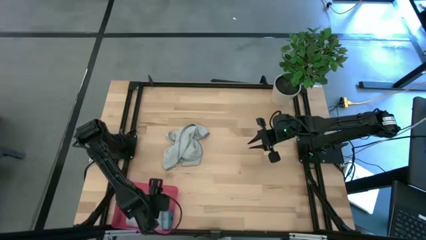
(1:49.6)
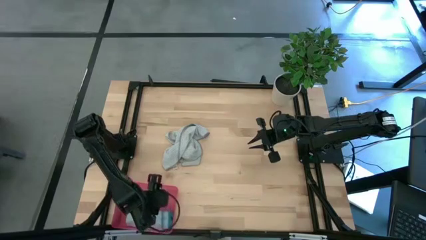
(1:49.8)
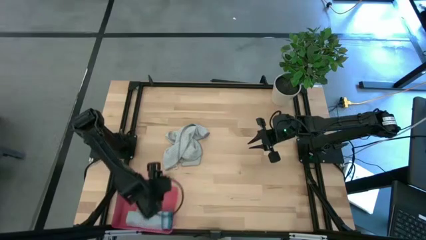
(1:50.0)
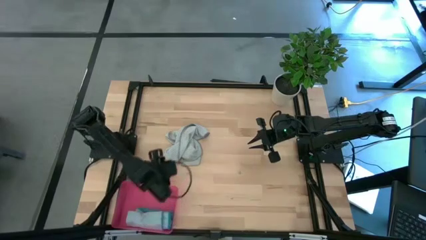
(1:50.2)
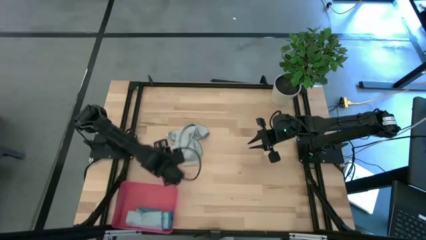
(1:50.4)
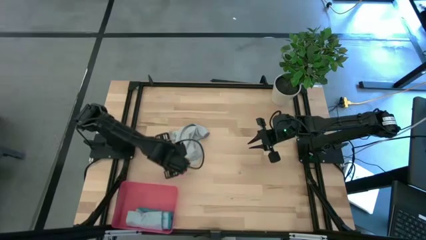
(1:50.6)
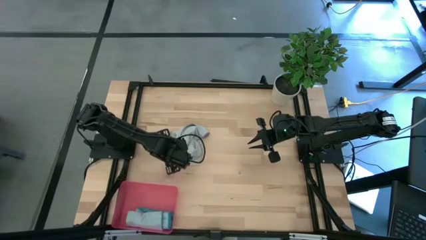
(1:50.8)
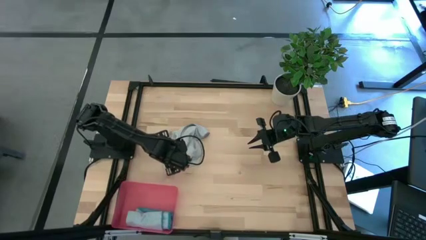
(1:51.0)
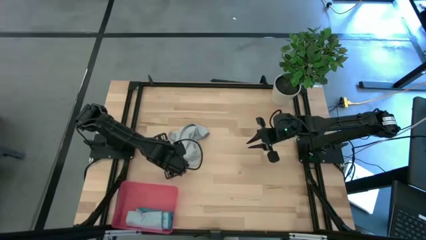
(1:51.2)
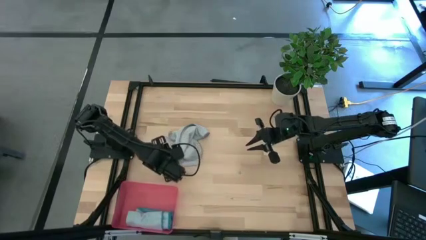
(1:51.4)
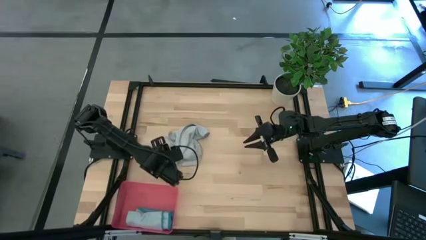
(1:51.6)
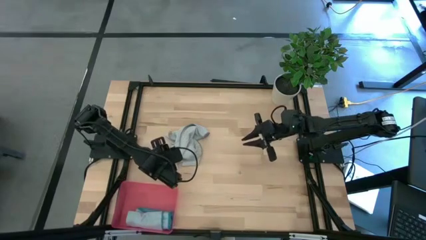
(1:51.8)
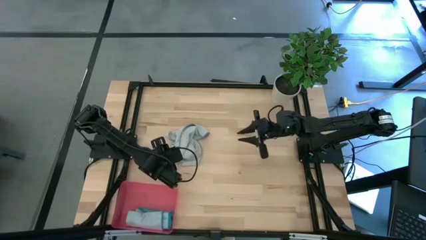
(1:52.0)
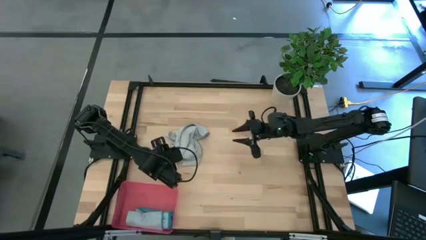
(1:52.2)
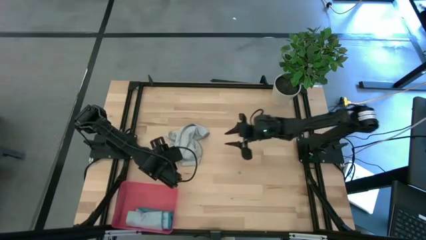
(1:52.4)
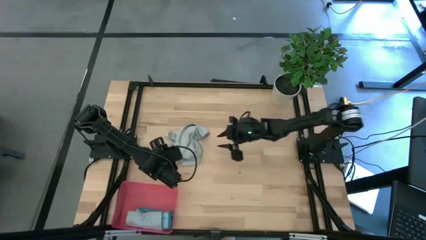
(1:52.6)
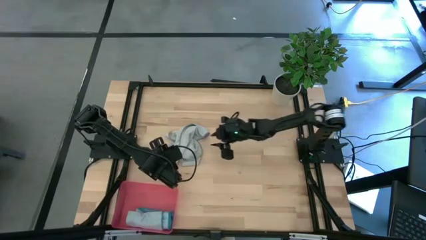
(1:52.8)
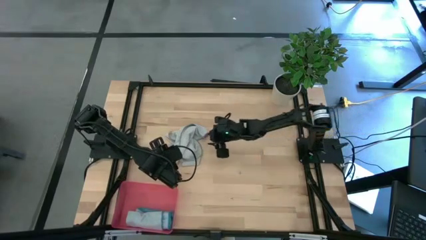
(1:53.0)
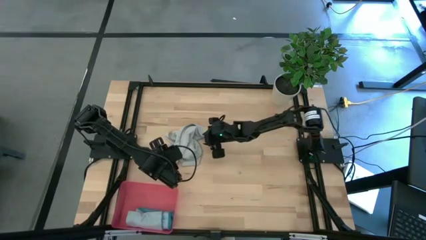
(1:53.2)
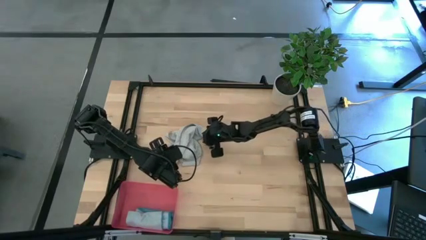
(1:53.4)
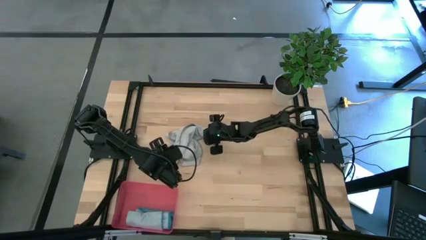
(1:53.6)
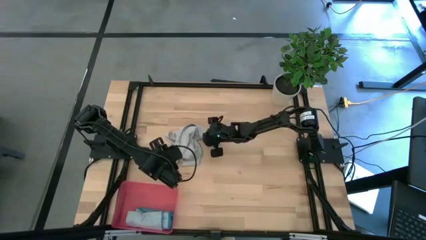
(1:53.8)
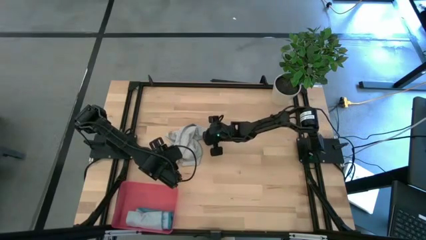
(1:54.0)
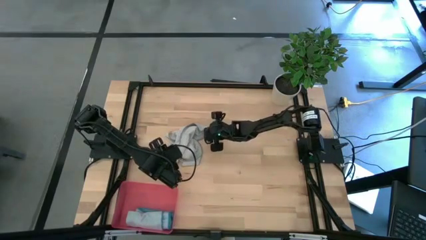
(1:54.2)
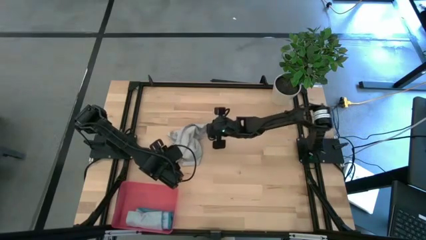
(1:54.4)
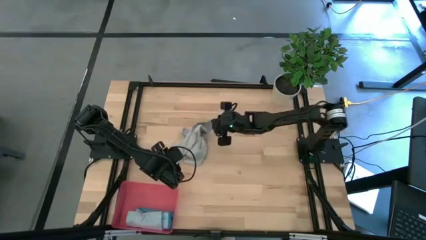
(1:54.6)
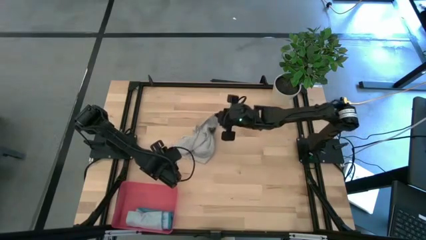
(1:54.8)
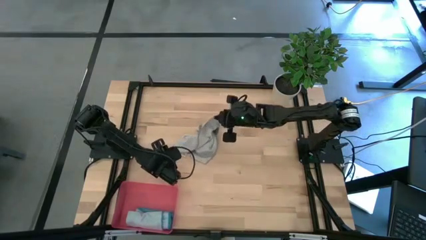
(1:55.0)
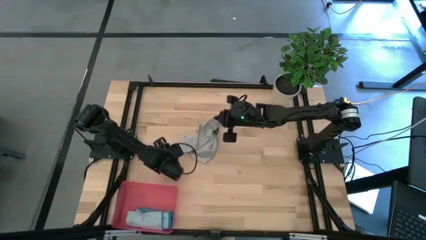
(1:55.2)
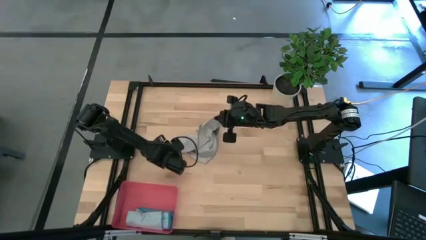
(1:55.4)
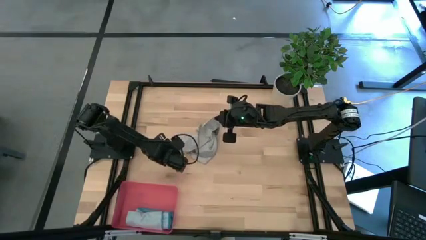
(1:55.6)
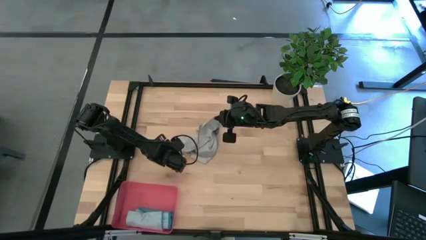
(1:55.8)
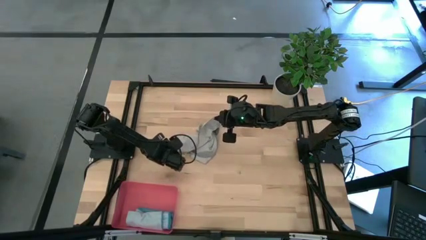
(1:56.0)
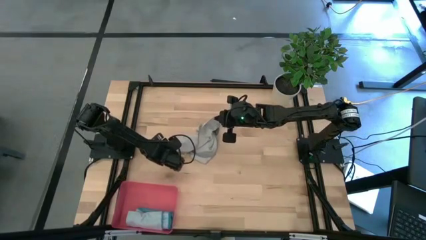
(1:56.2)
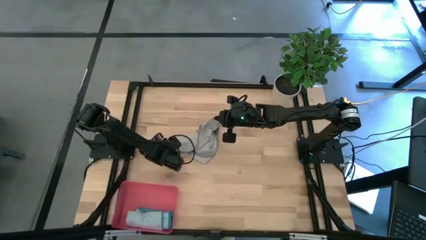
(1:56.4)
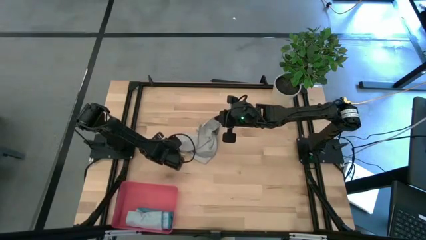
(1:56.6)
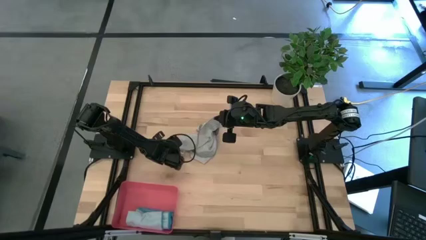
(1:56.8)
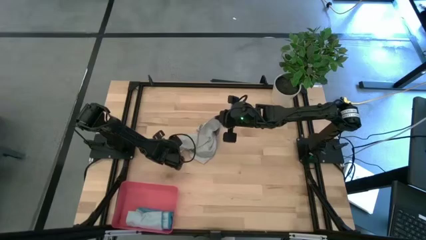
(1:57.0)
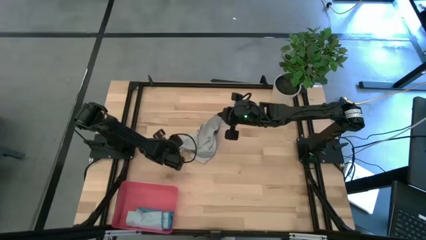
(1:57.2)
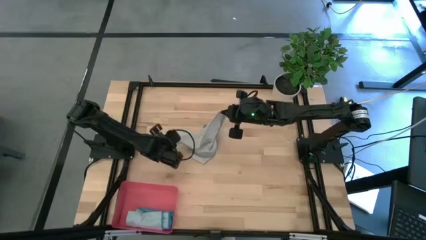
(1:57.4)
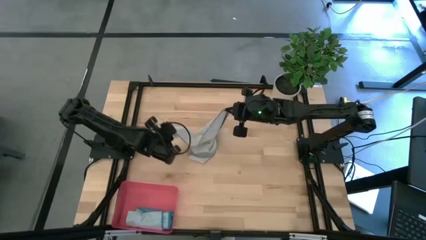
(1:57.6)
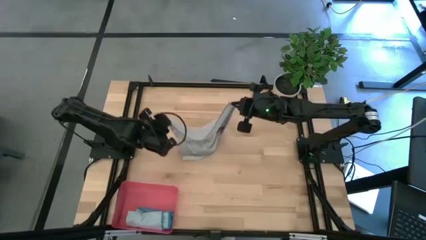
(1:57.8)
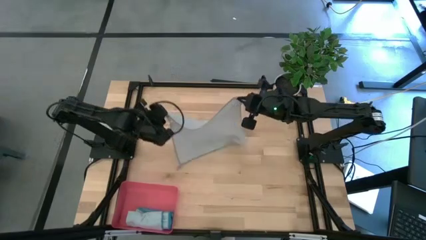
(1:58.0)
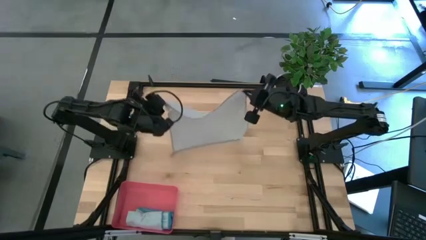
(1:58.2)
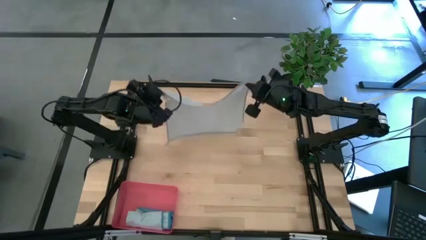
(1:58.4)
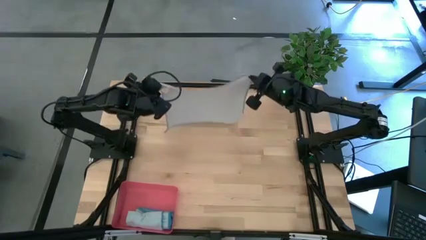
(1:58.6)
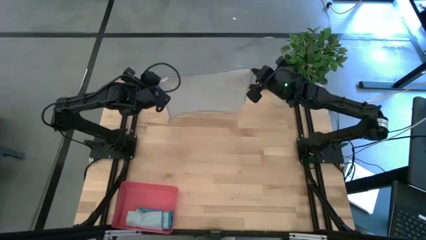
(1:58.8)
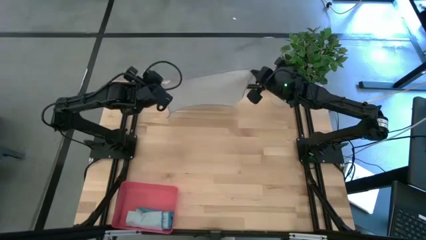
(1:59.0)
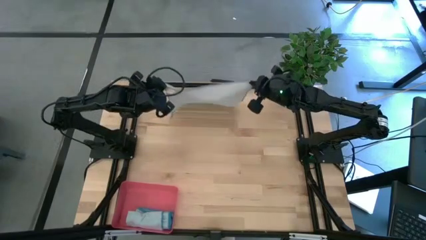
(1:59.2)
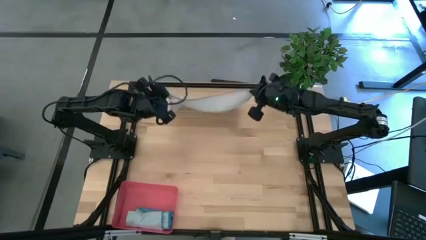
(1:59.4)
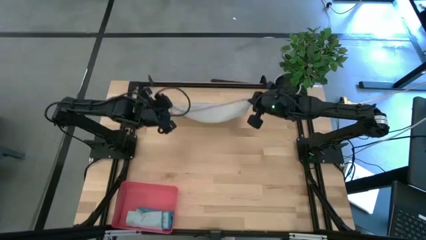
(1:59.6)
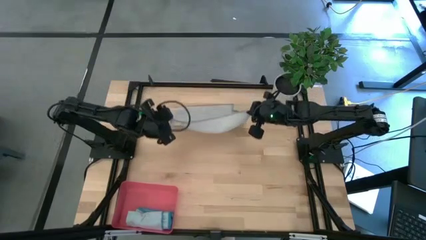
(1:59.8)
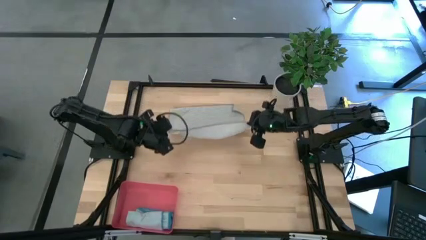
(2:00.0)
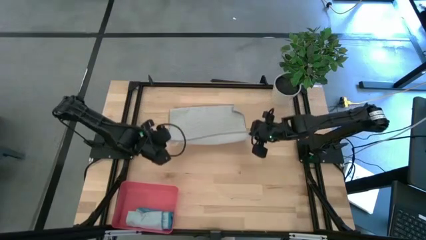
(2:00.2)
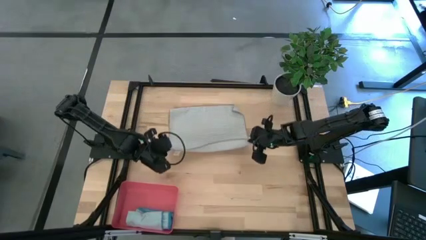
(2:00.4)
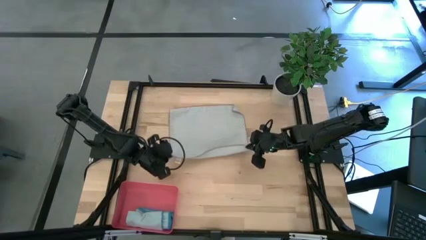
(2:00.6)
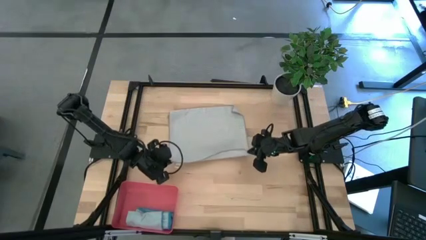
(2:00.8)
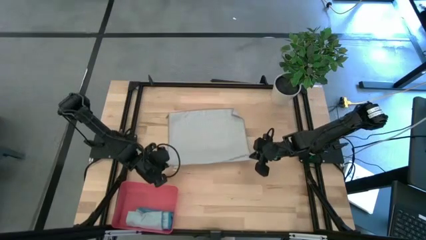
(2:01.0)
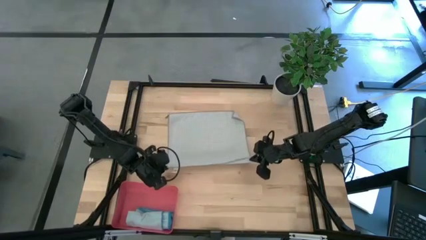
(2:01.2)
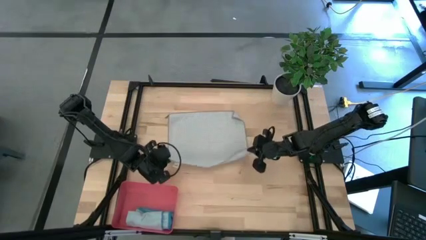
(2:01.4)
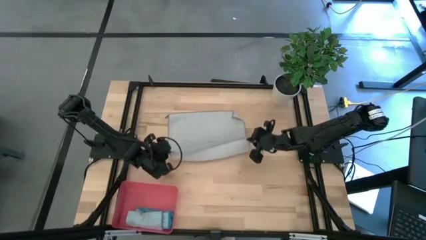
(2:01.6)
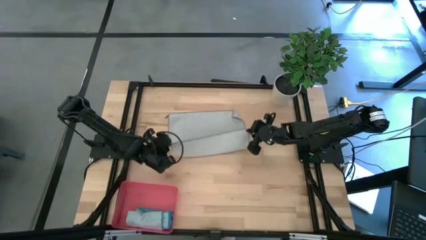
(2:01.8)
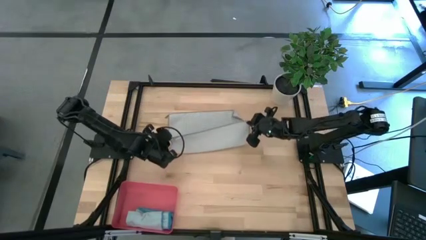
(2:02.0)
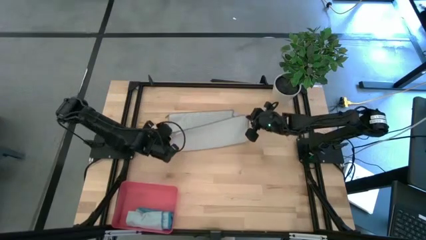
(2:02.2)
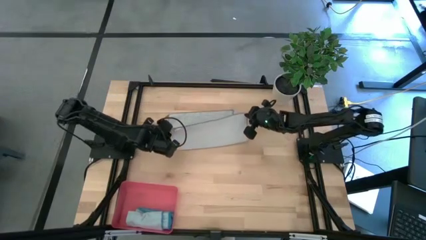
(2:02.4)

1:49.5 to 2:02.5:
Task: Roll microfiber towels into tight, uniform cylinder then place into a basket
Fold the gray towel

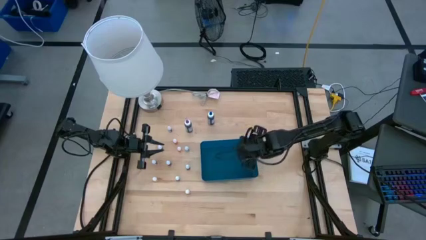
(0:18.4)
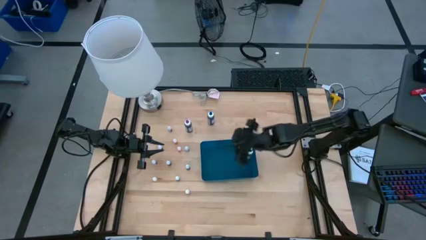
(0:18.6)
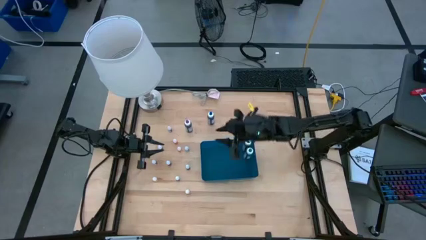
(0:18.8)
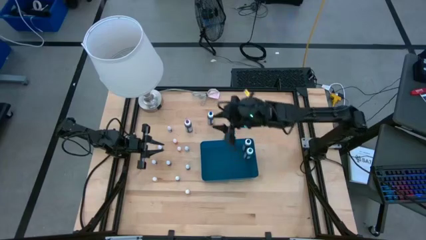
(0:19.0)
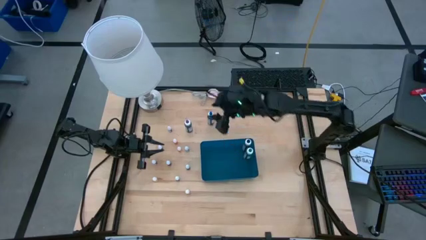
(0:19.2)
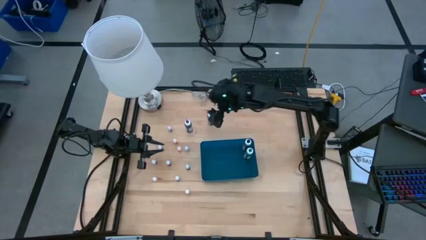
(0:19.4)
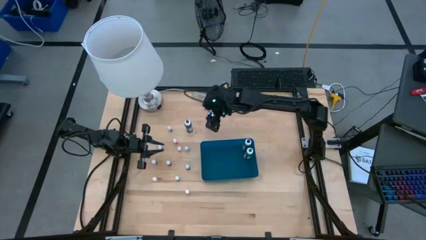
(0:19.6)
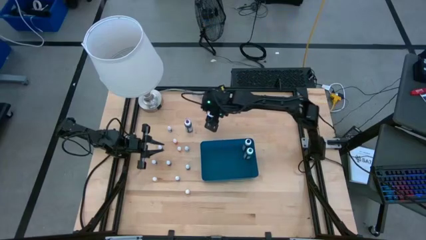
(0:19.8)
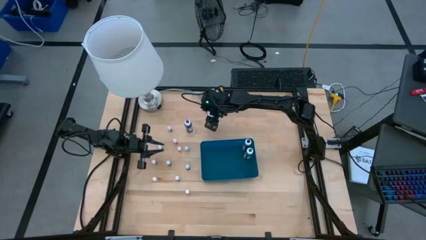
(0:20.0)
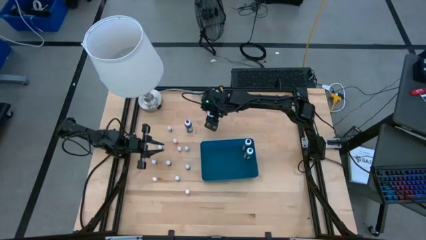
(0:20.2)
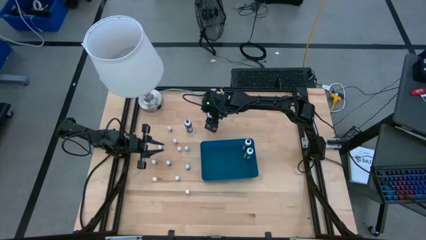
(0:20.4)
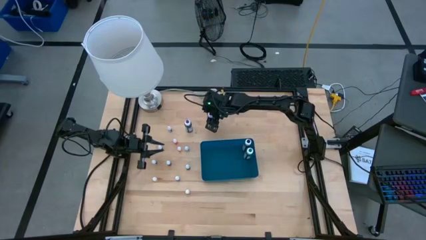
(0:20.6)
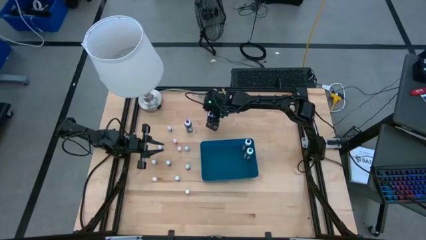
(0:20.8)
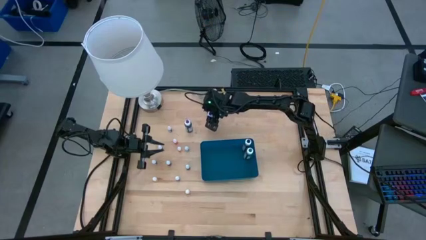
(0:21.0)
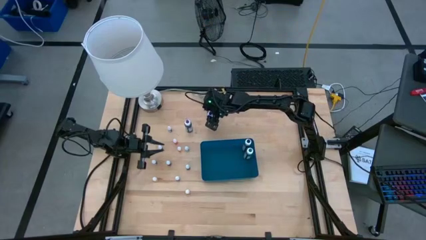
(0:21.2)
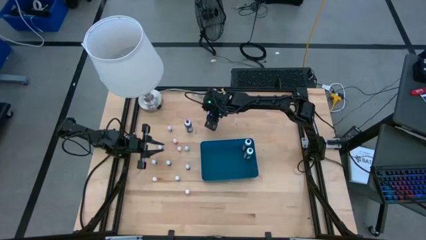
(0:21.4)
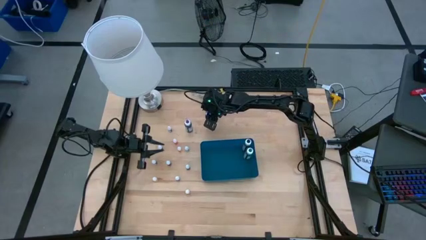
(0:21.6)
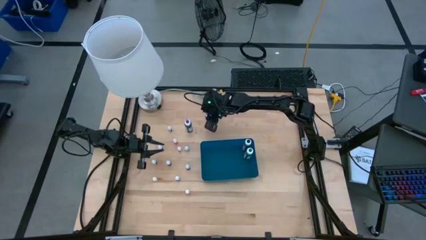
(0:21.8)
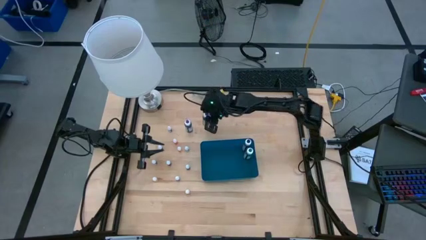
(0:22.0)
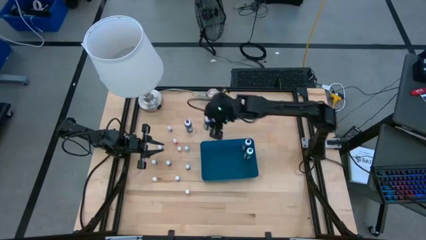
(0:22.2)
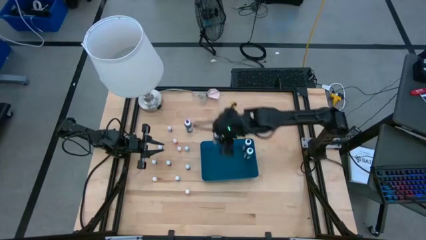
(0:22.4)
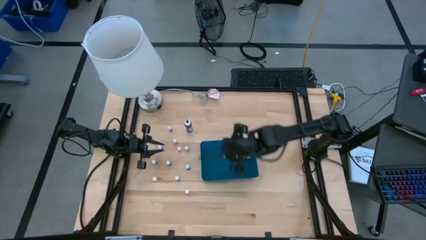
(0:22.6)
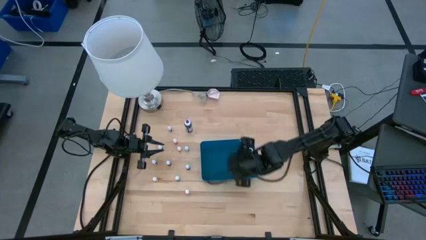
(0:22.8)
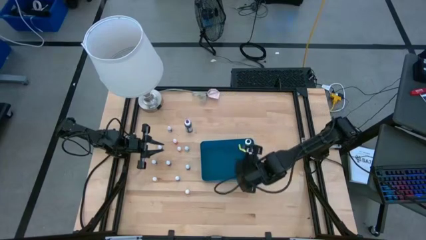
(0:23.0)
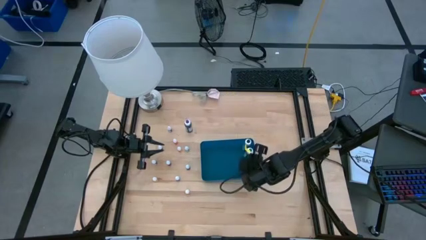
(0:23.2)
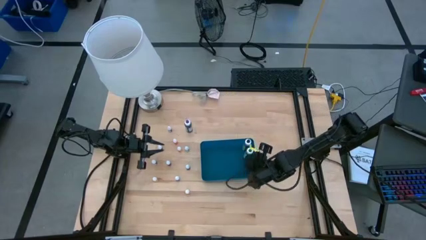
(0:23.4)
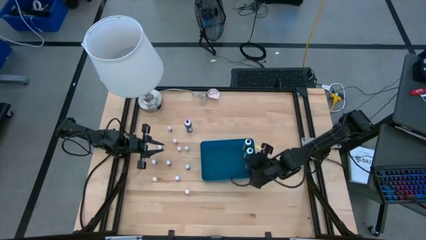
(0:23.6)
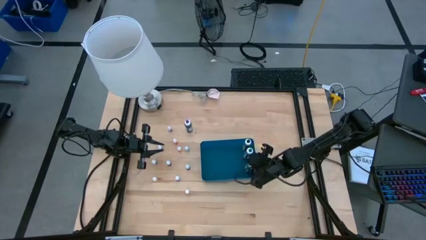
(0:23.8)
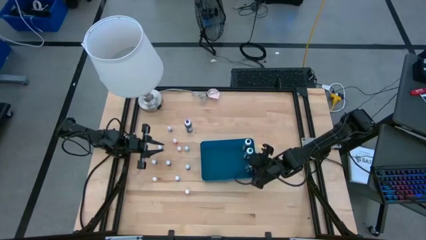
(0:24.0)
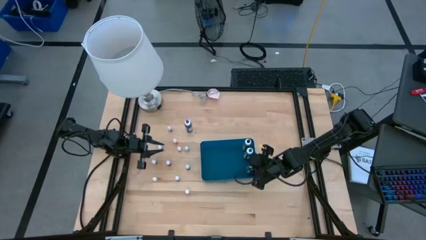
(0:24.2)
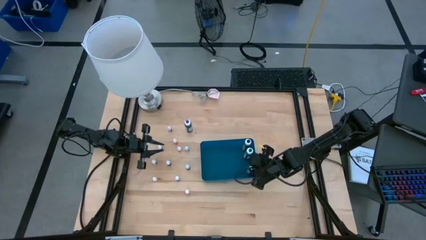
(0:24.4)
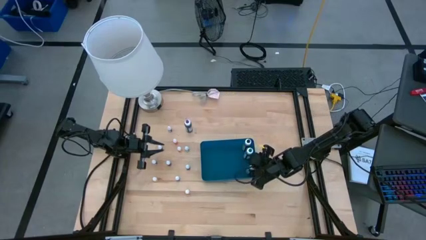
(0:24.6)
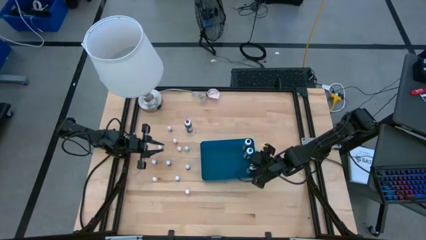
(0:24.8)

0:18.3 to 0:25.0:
Task: Pick & Place food coloring
Put the large blue food coloring bottle into the blue bin
